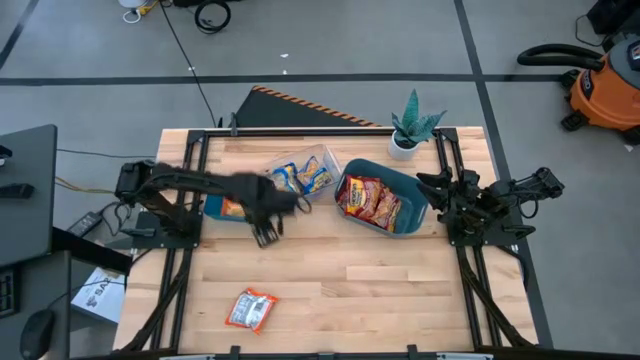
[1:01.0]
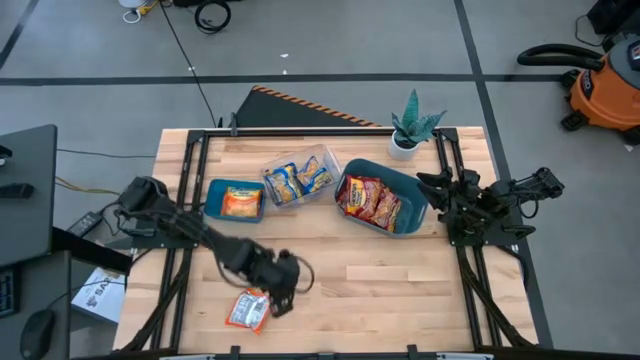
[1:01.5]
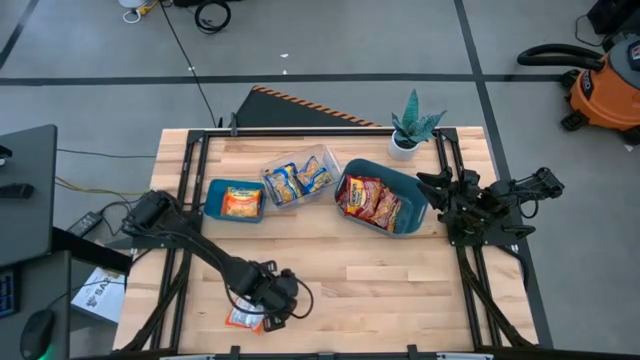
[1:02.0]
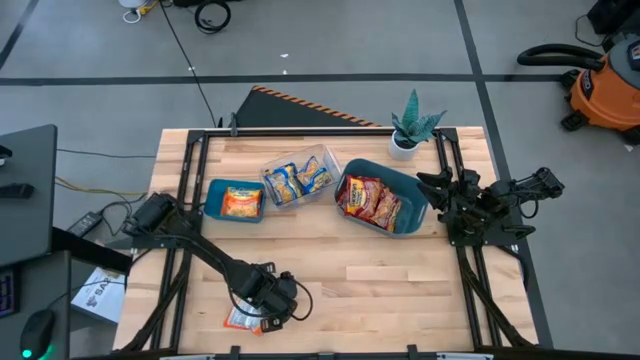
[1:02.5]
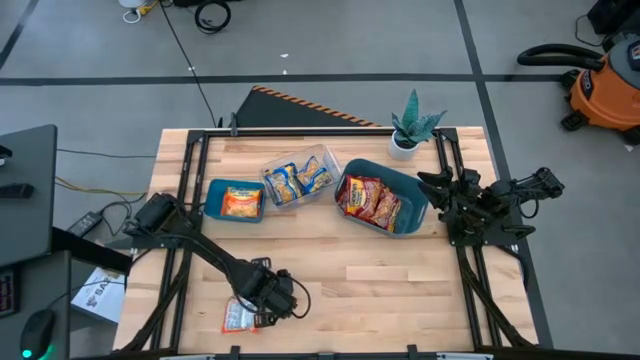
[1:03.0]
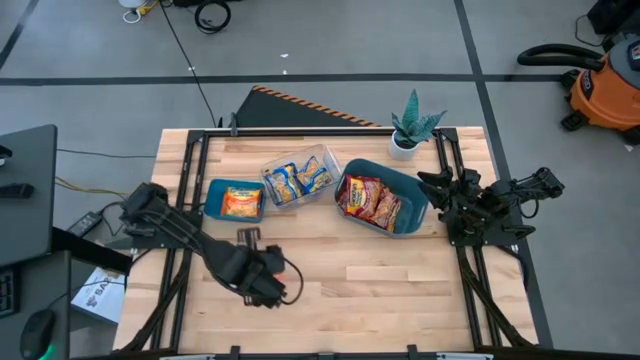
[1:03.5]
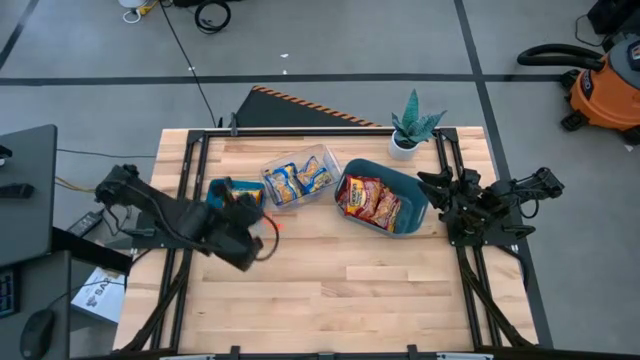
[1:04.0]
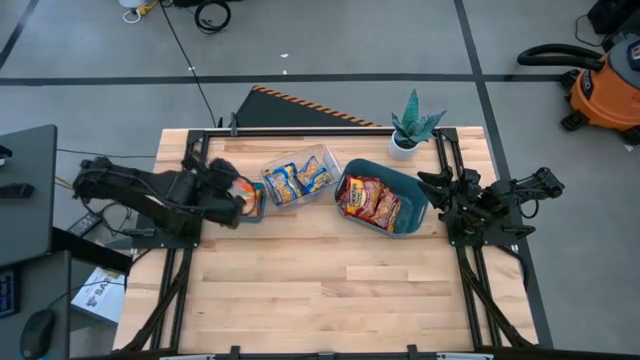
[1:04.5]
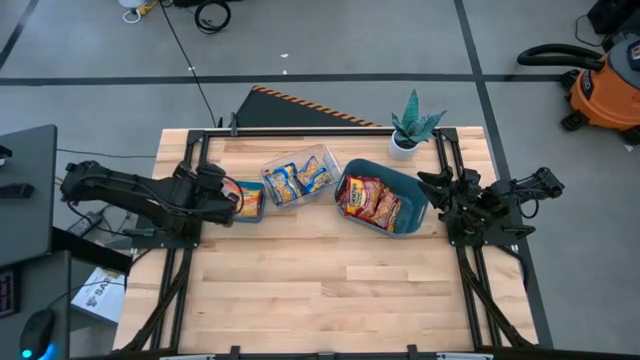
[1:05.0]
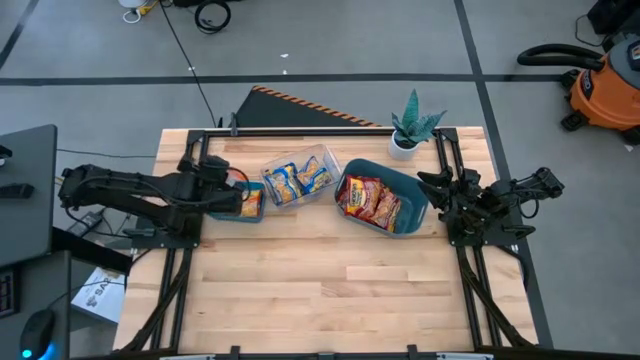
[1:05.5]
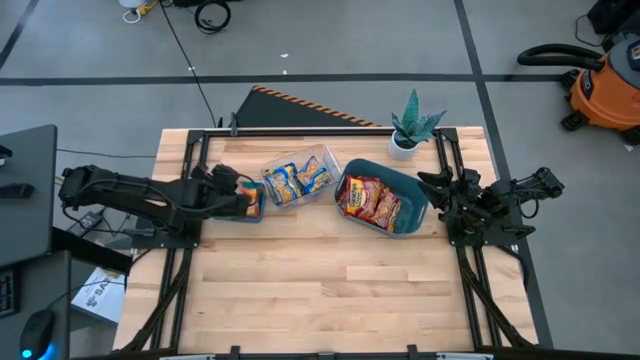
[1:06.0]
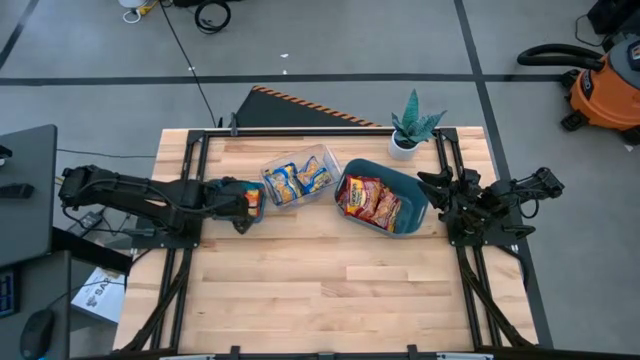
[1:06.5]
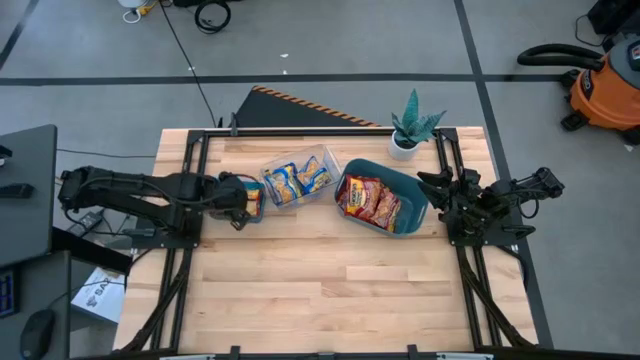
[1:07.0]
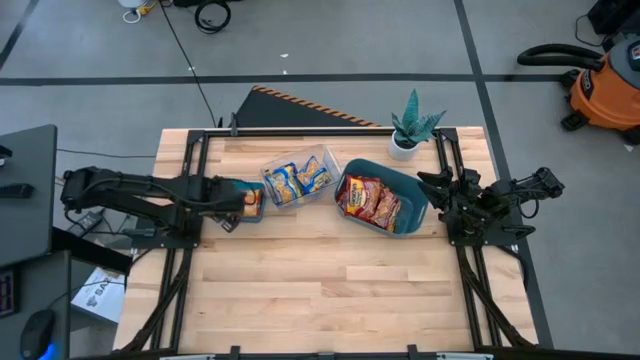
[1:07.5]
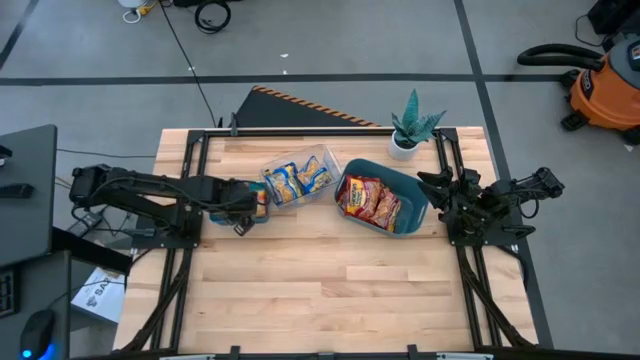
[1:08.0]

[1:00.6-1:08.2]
Task: Sort Maruchan noodles
Put the orange noodle pack into the blue bin

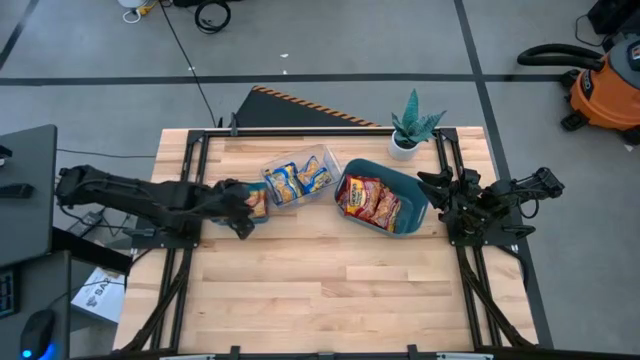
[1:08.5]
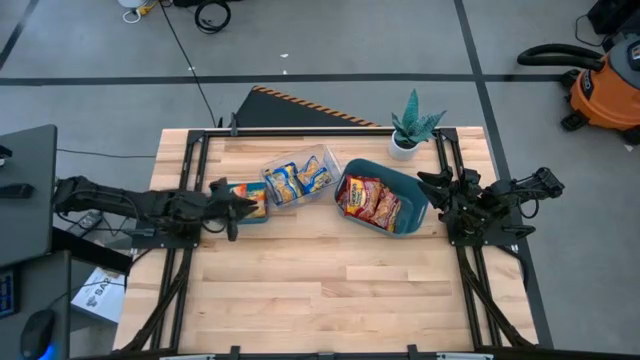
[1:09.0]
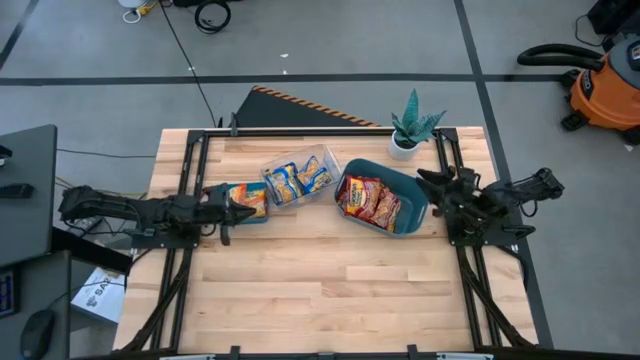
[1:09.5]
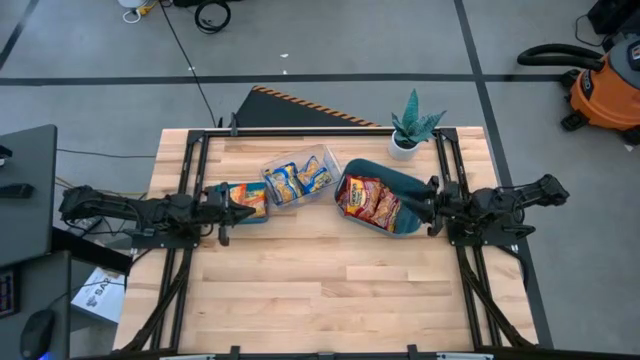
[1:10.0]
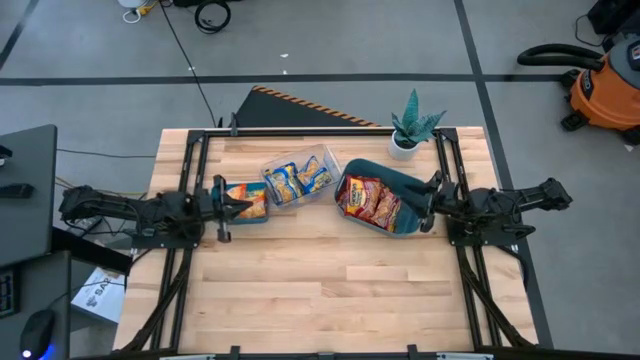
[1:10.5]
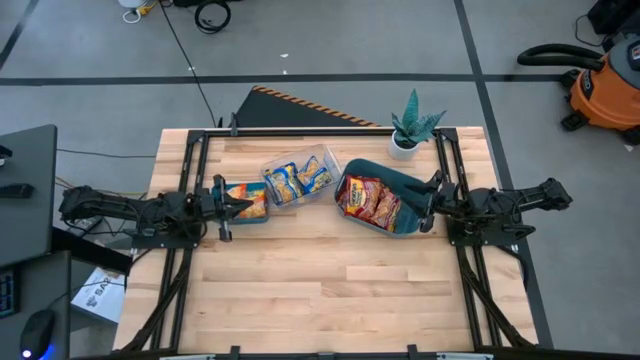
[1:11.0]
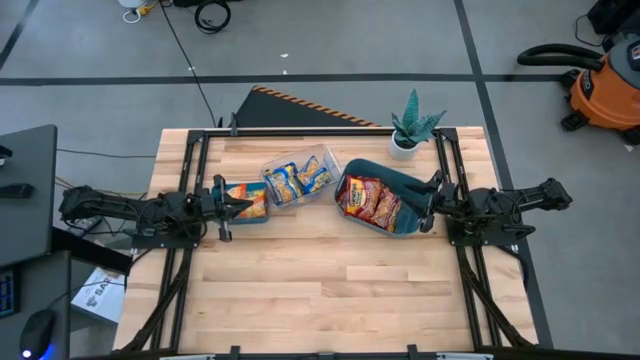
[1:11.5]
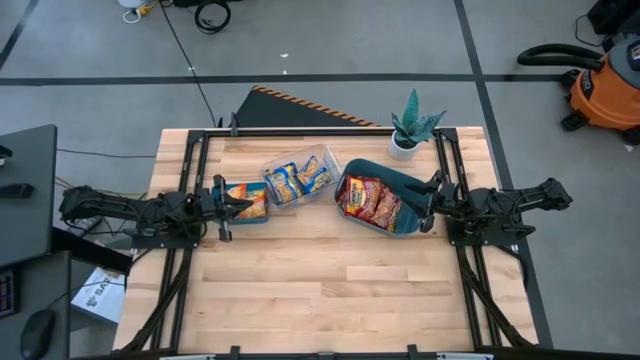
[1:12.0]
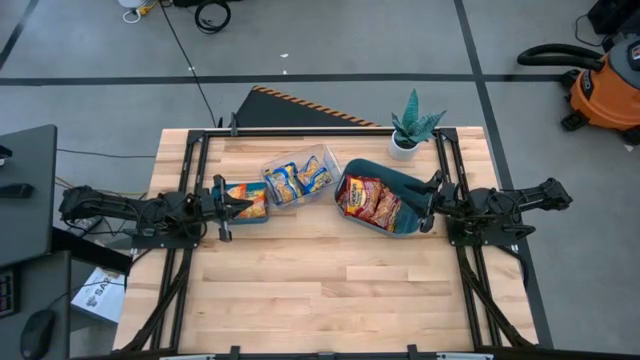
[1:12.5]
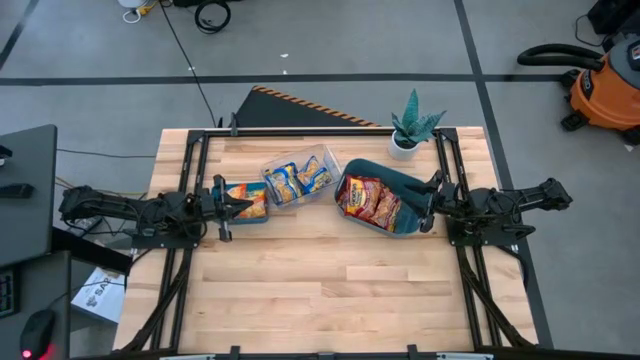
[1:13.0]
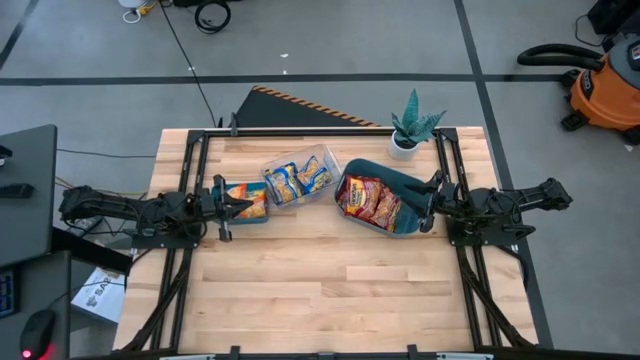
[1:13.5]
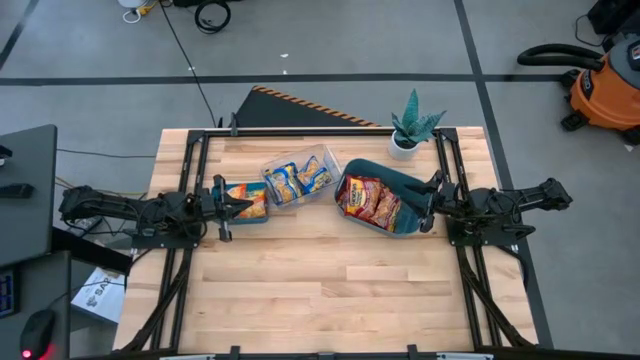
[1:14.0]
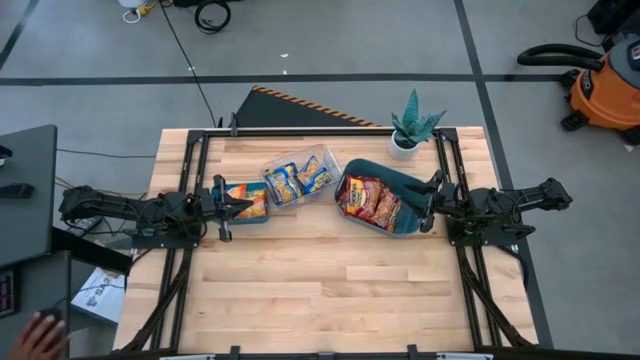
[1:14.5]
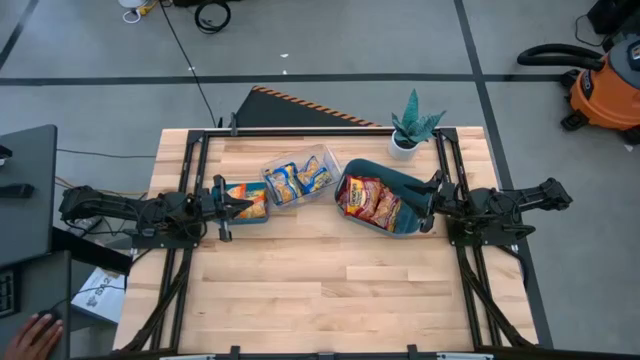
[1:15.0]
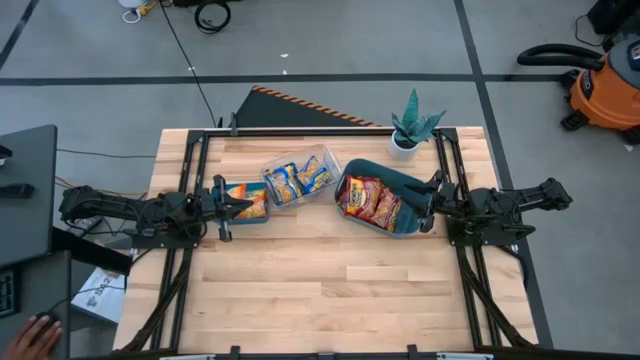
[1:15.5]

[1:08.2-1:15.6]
Return to Home Position

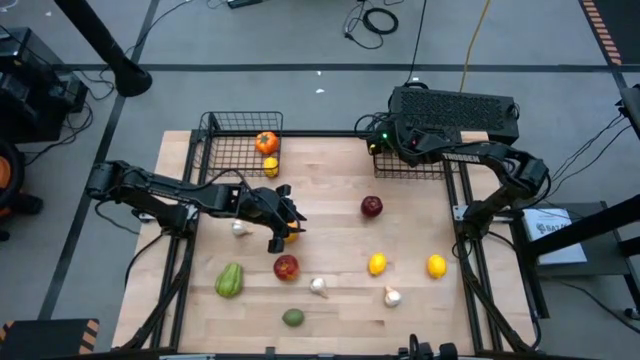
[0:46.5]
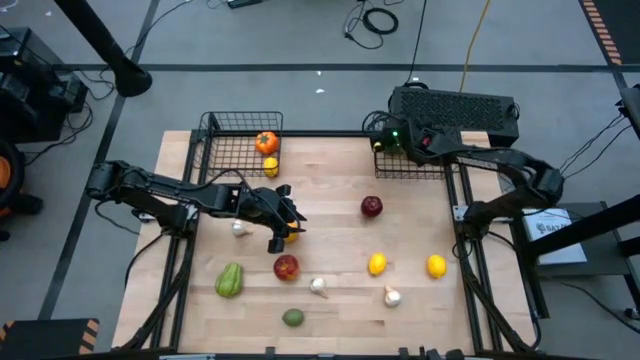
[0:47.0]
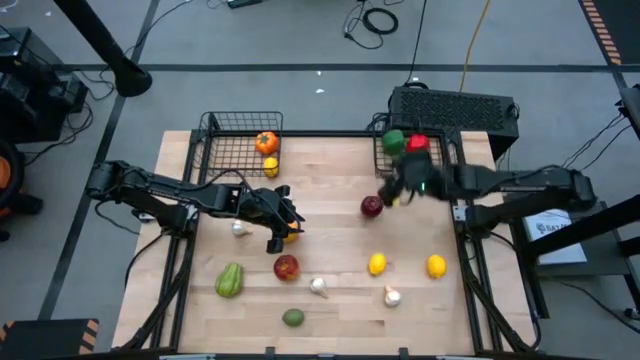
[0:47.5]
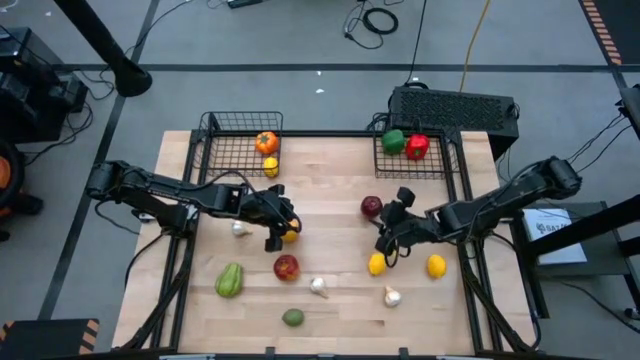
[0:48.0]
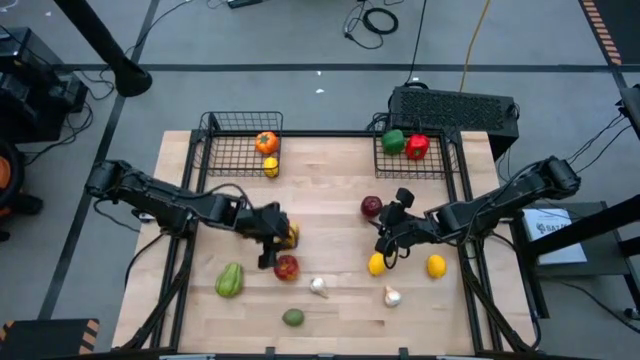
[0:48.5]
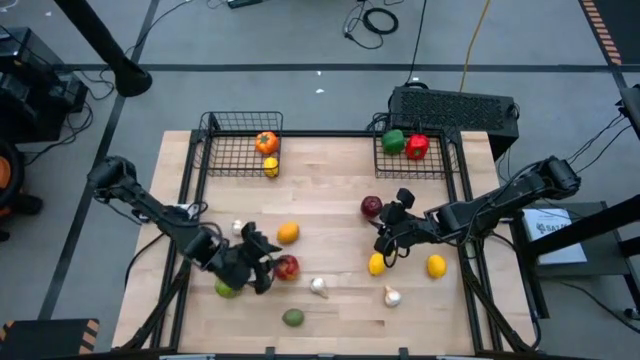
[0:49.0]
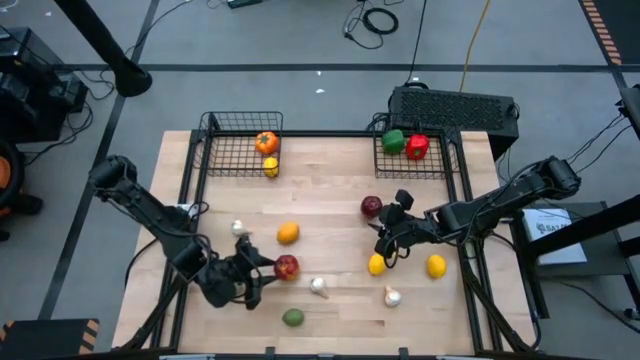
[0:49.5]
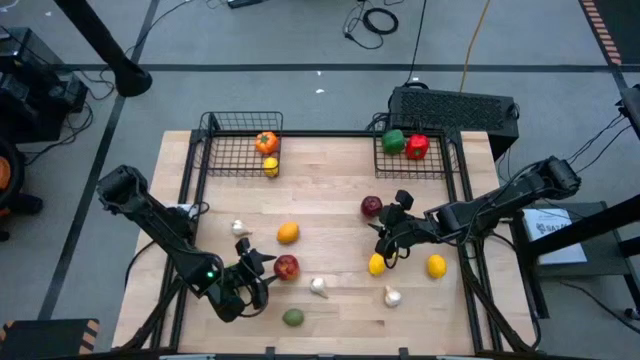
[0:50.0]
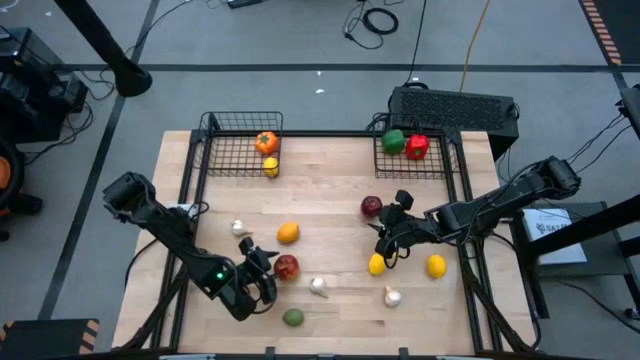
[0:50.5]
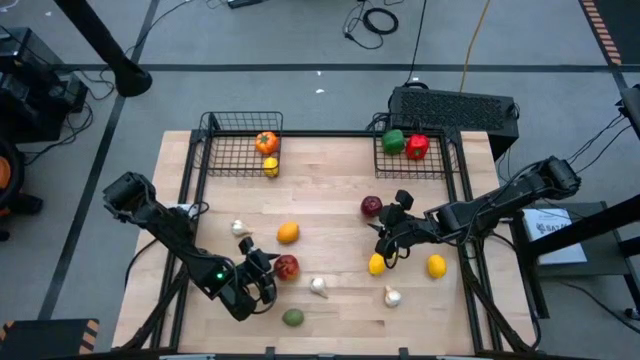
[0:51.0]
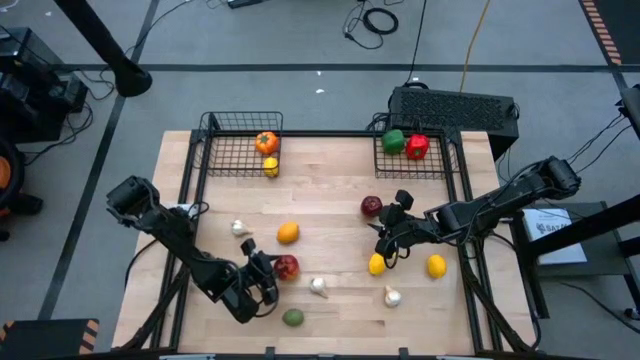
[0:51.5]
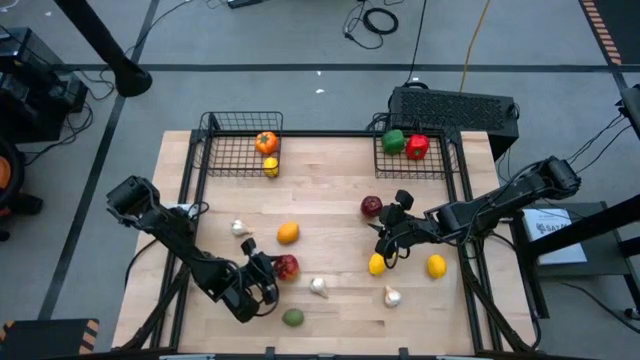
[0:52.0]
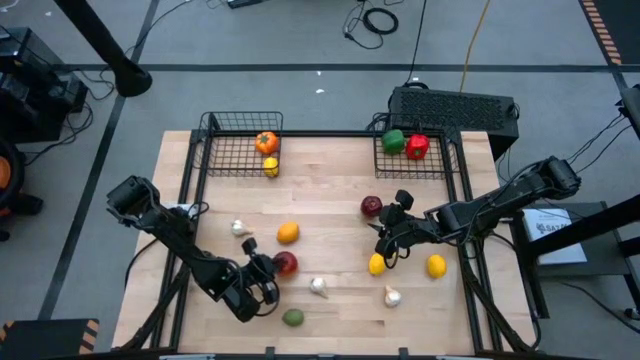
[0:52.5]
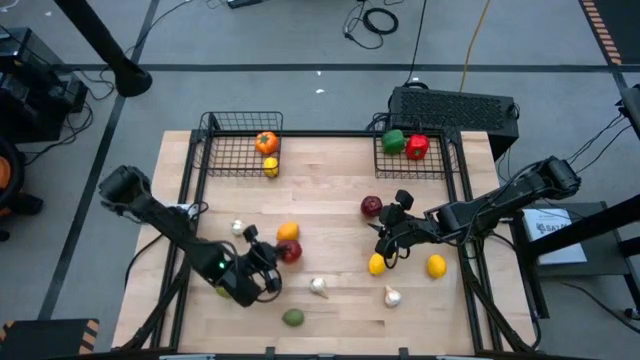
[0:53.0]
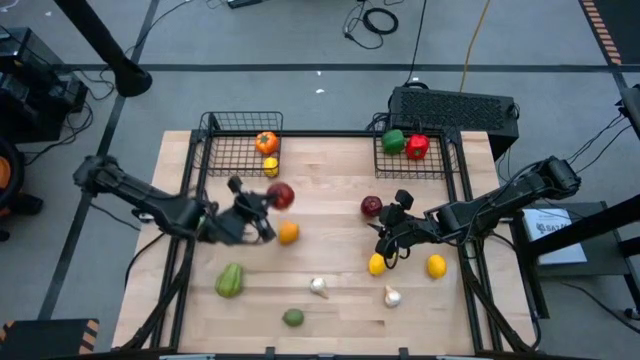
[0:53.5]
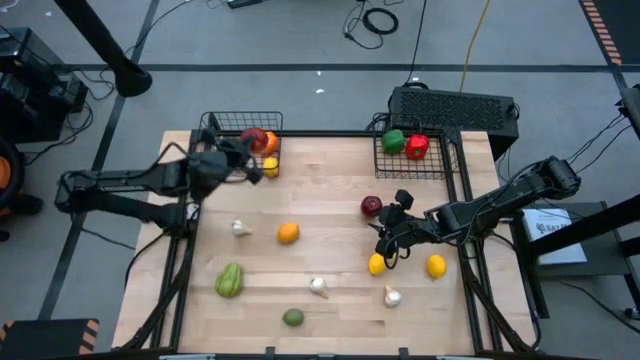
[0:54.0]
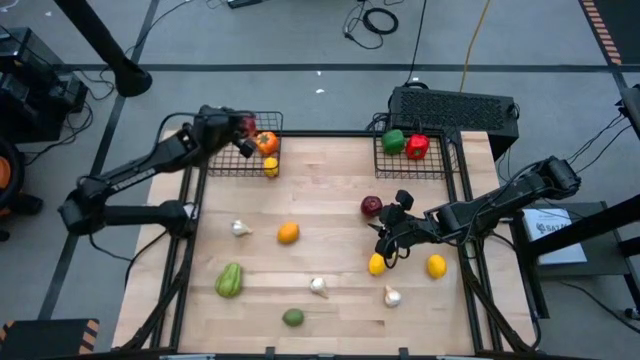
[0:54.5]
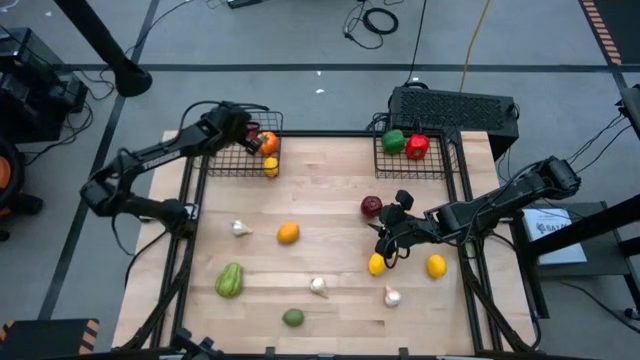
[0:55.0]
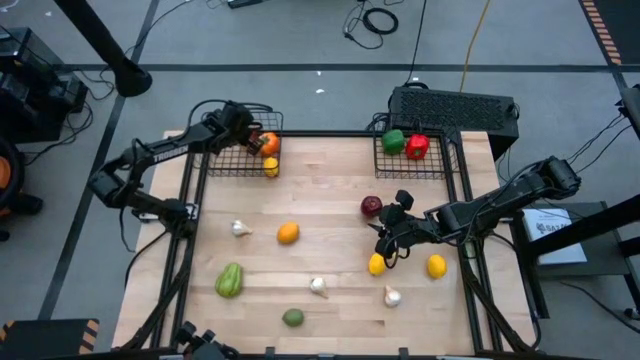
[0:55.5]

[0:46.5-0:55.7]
Task: Sort produce into baskets
Put the left red apple in the left basket
